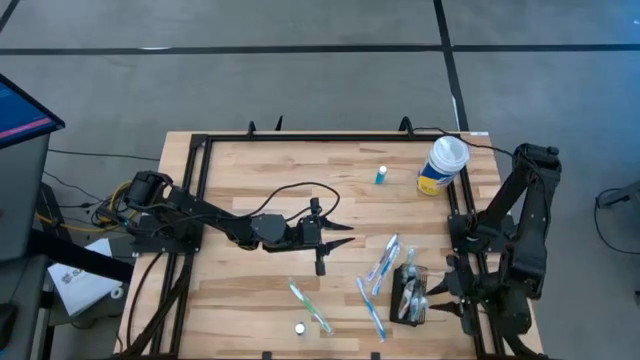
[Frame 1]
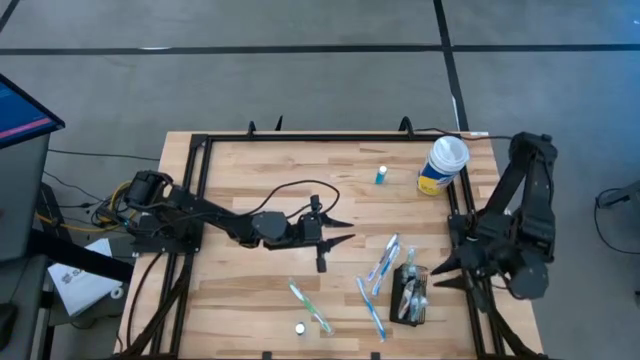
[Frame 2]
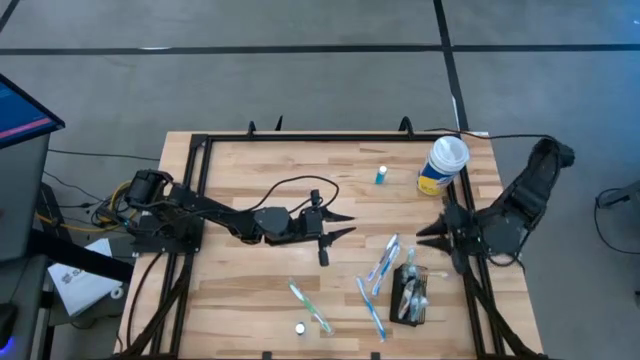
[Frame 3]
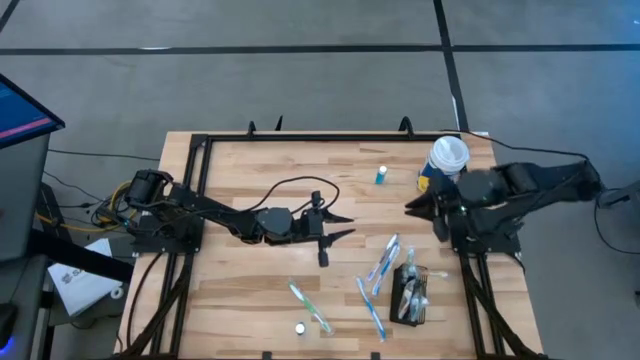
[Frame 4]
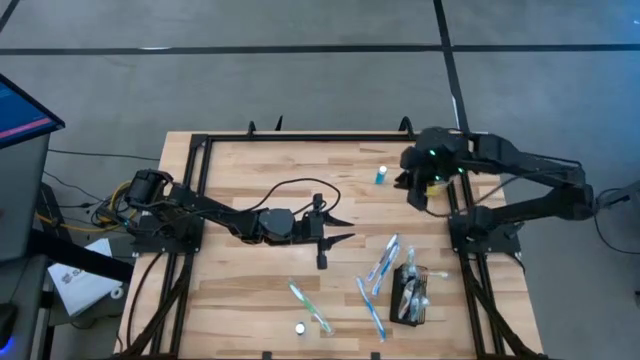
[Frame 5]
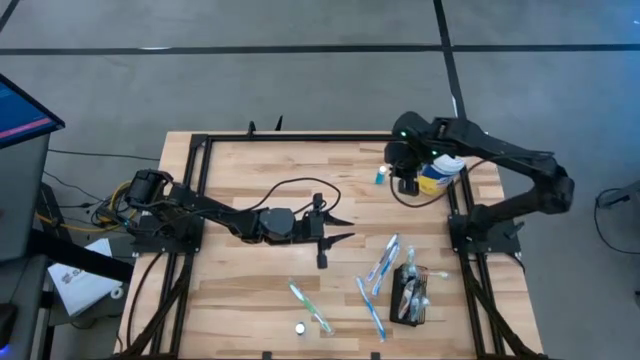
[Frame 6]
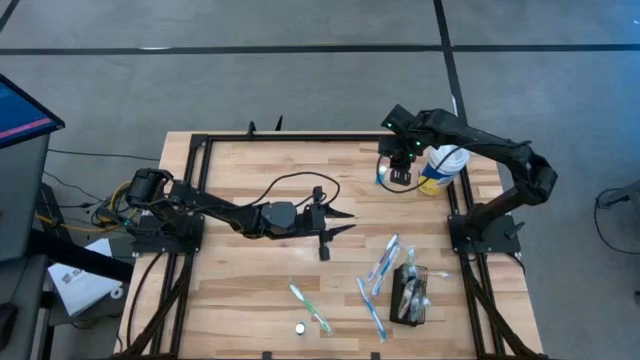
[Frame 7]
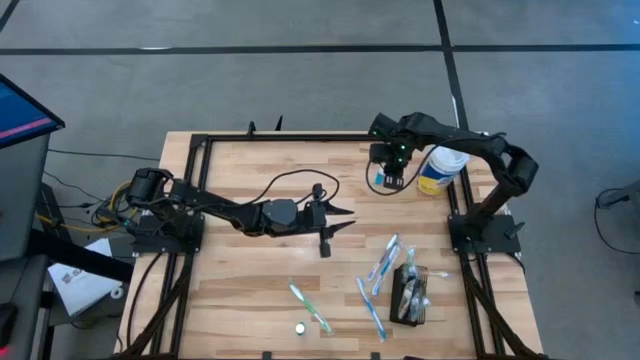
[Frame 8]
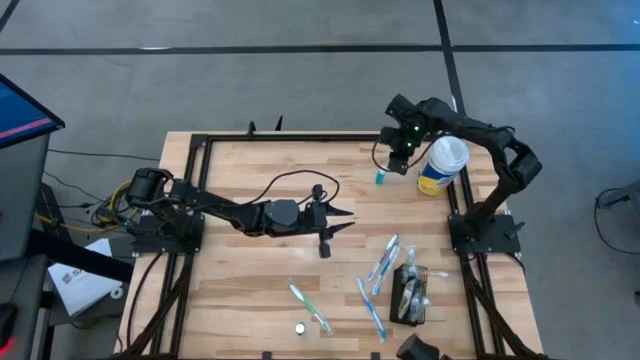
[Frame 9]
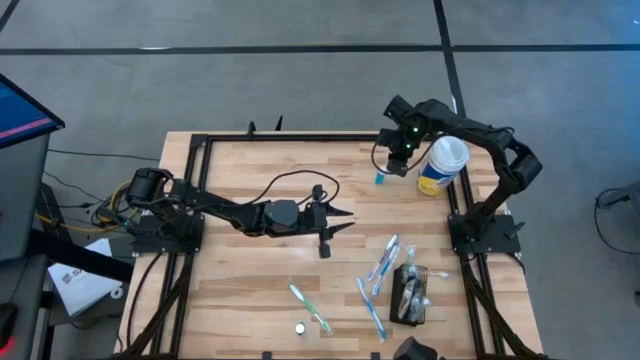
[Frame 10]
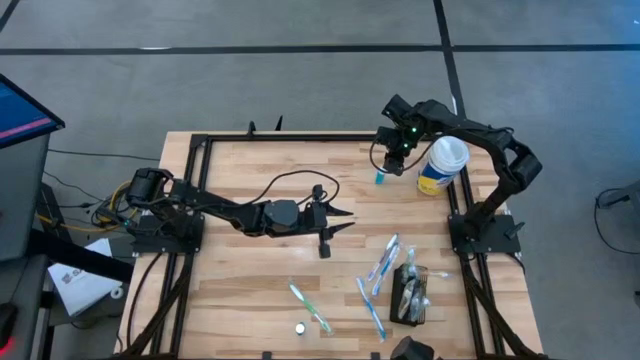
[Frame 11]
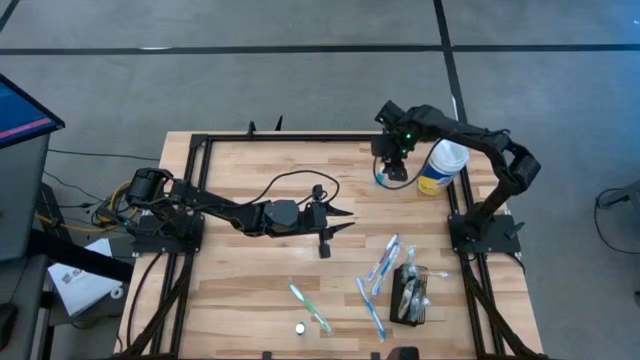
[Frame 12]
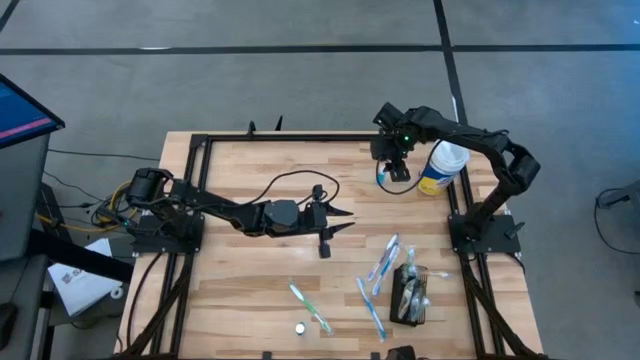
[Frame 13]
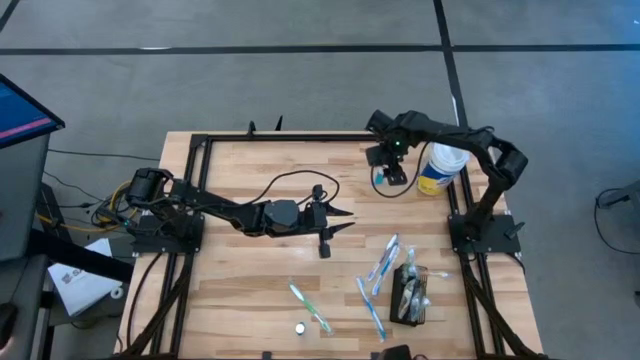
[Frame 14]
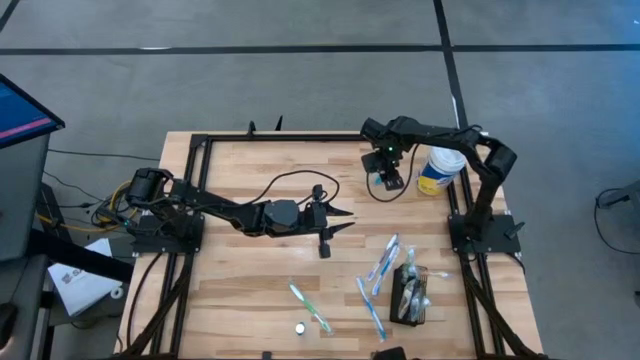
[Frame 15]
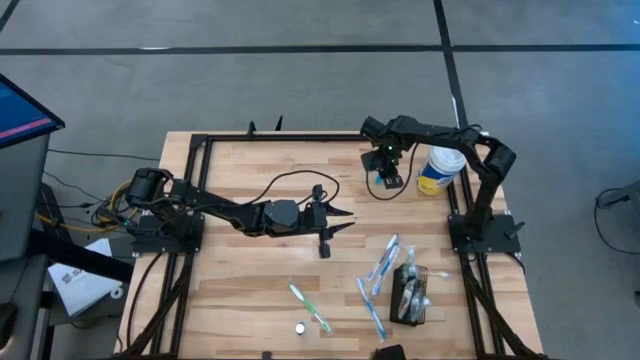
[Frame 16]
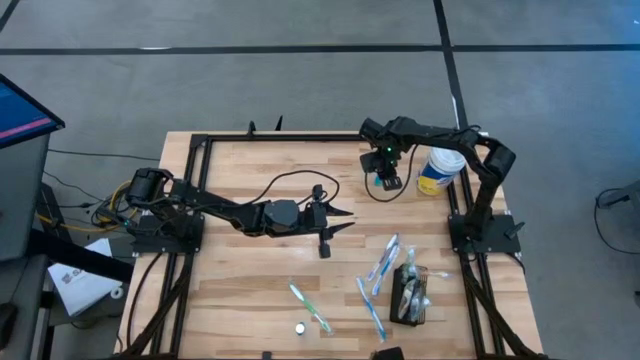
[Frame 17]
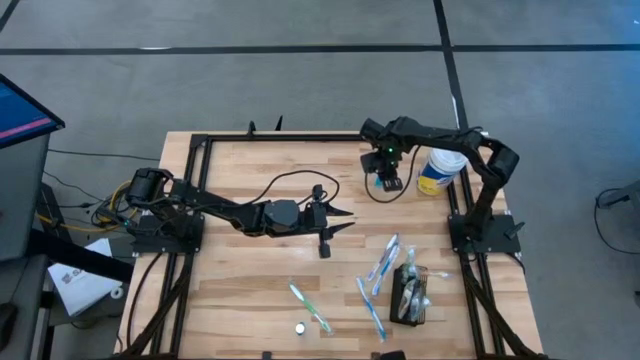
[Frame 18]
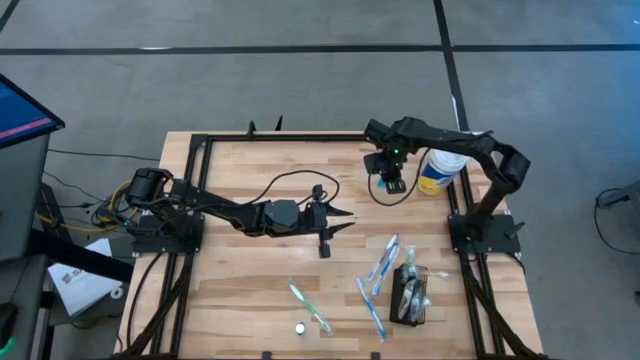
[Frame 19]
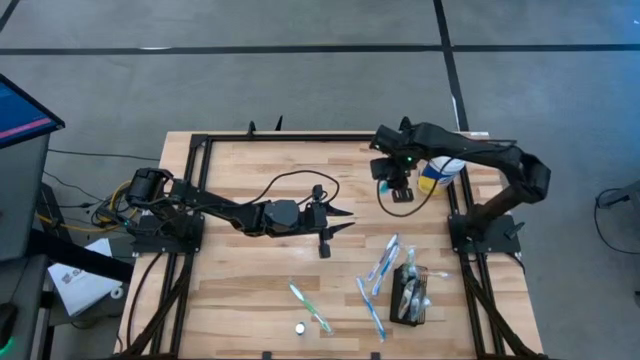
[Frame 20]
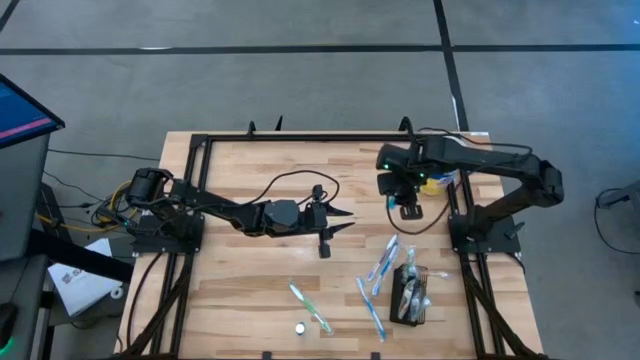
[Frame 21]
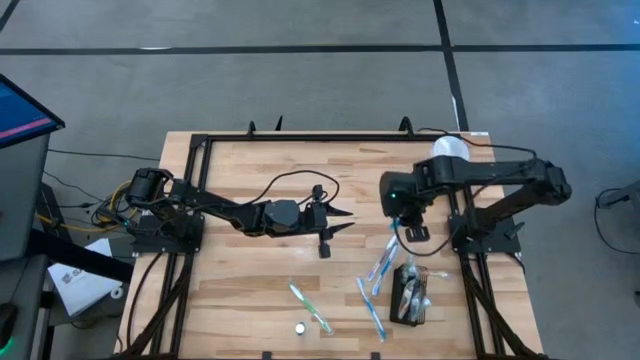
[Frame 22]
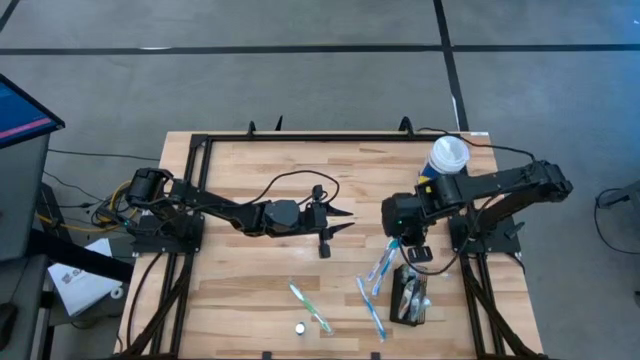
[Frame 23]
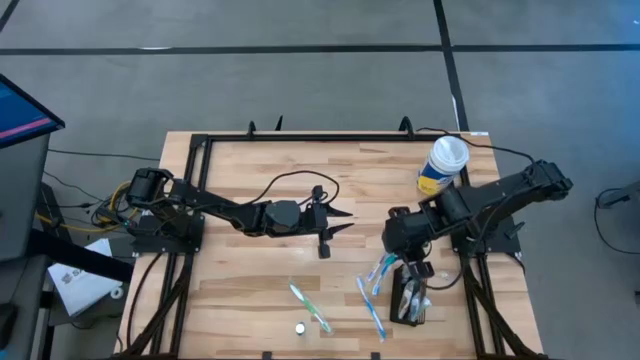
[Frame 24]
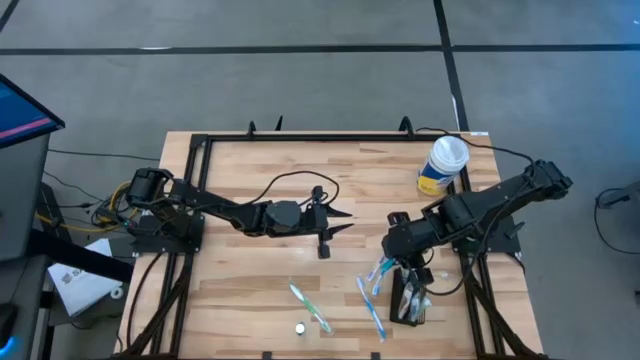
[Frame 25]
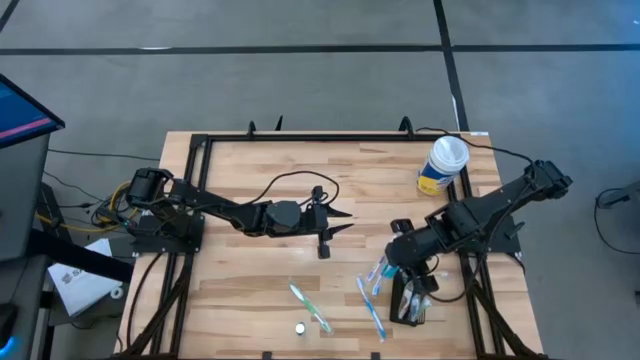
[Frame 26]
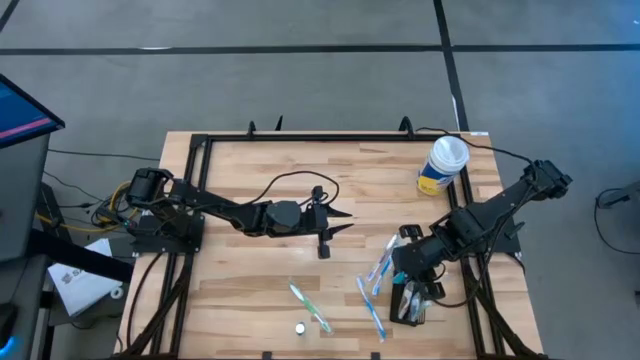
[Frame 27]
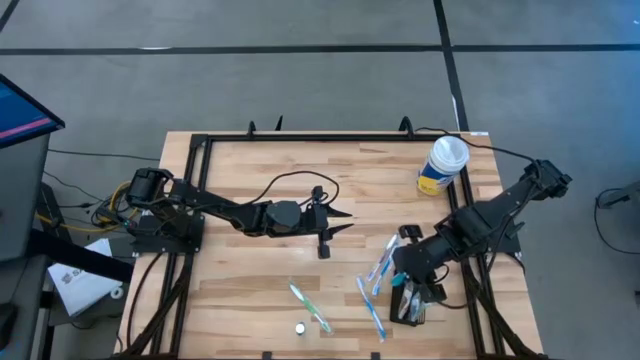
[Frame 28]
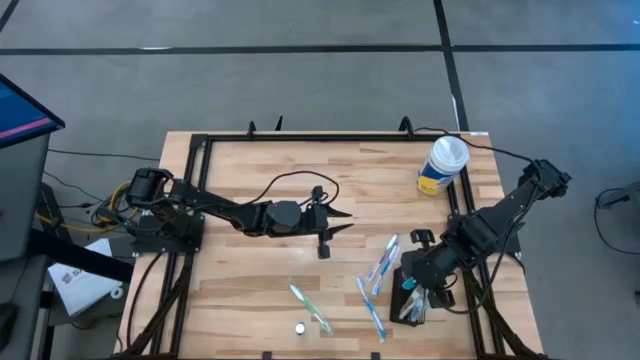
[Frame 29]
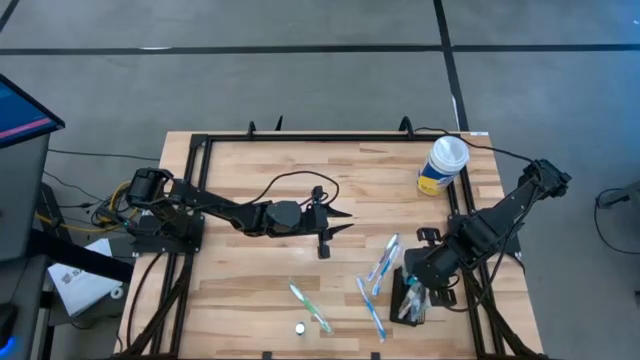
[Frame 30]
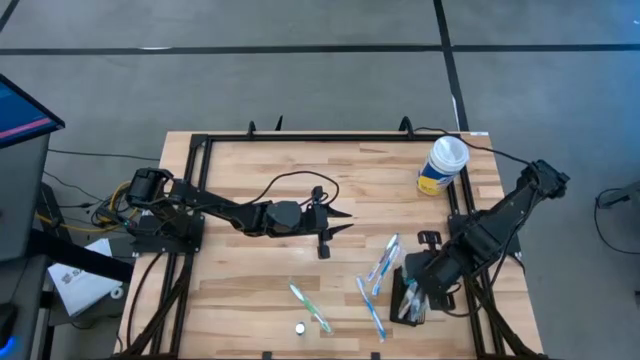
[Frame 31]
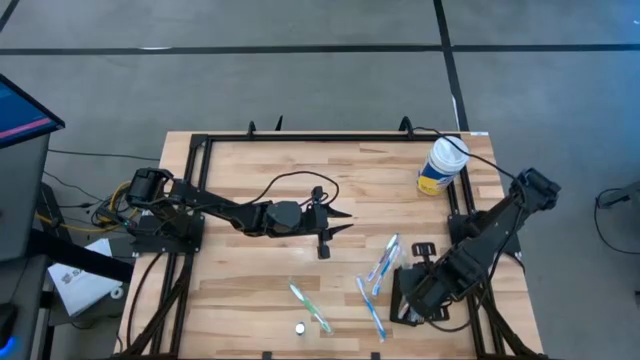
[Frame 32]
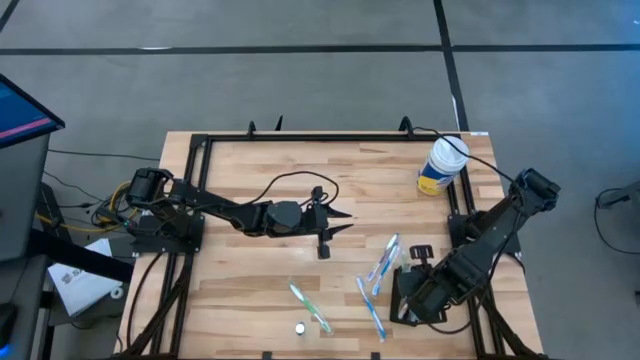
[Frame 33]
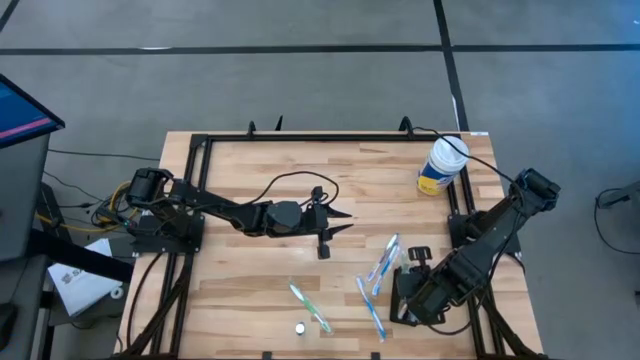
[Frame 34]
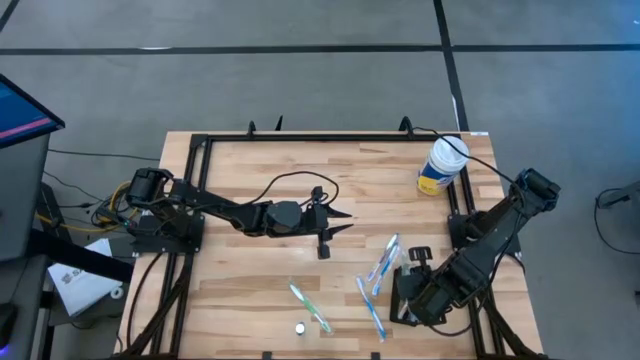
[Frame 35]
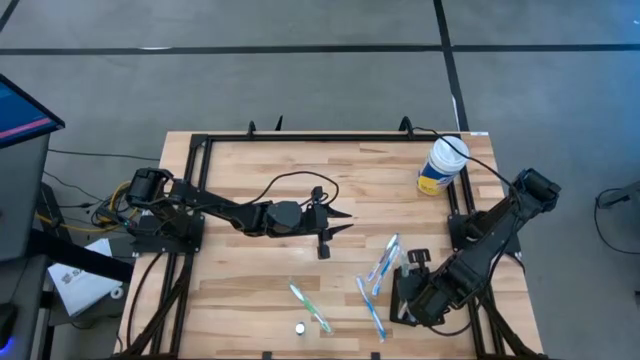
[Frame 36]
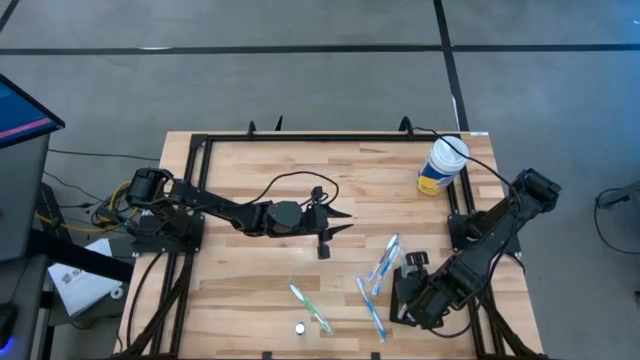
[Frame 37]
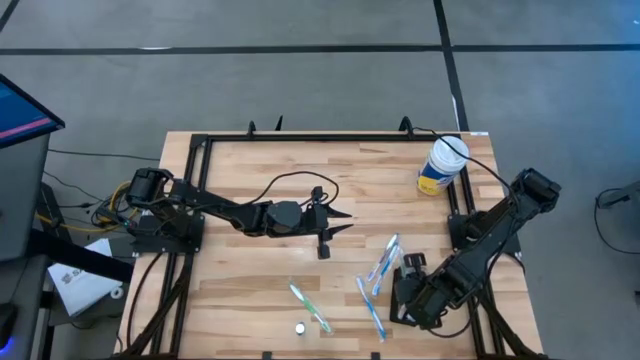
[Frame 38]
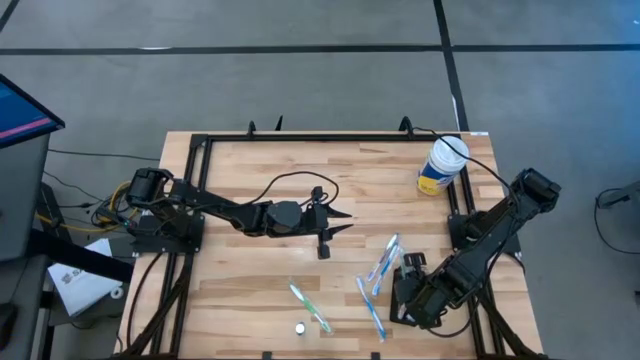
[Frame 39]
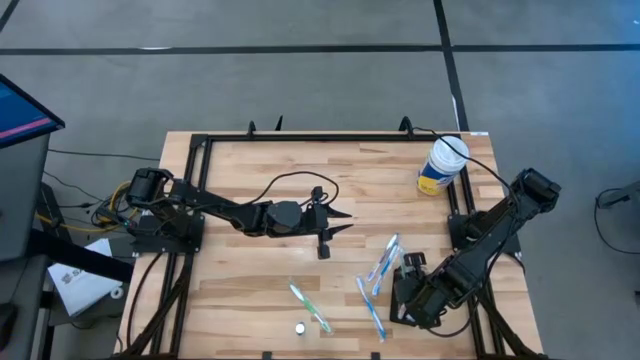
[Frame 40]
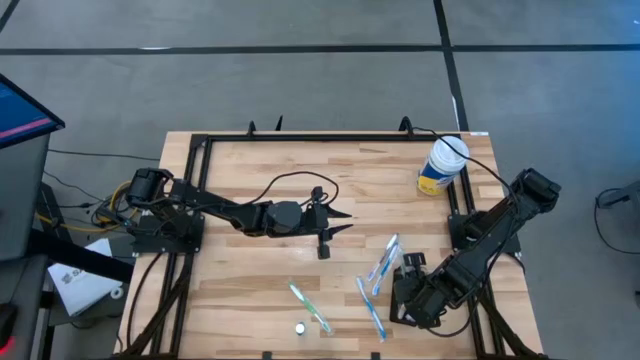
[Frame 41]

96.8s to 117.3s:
Task: Pick & Place toothbrushing station
Put the blue mouthwash into the black wire organizer
